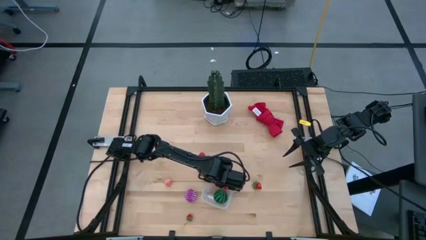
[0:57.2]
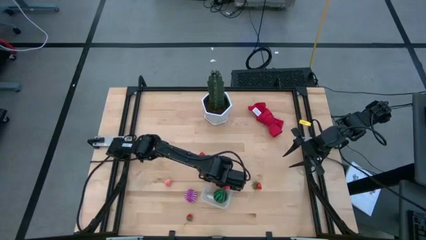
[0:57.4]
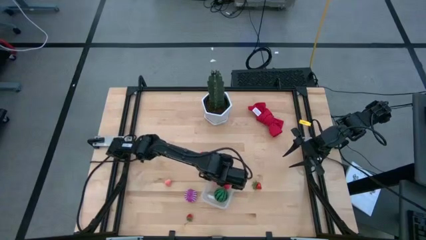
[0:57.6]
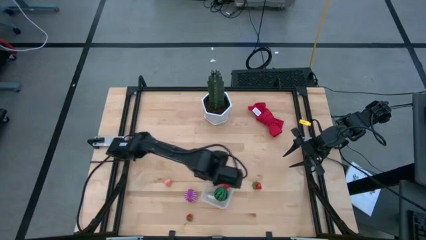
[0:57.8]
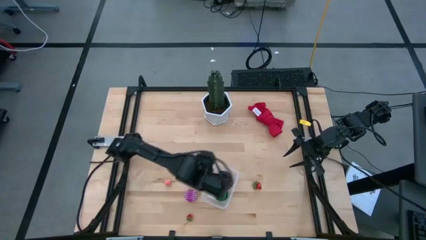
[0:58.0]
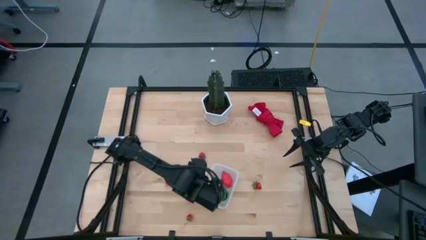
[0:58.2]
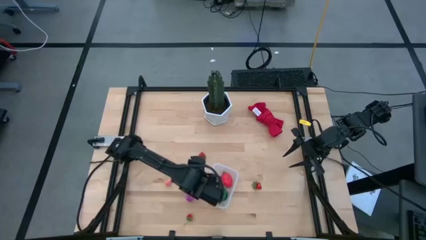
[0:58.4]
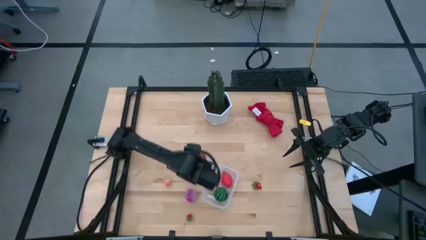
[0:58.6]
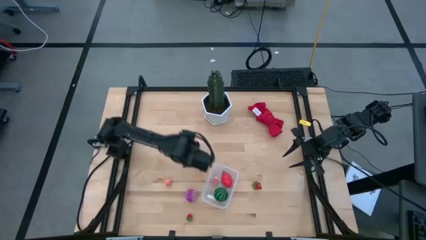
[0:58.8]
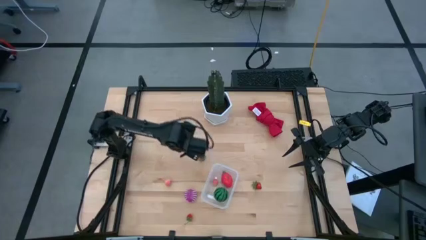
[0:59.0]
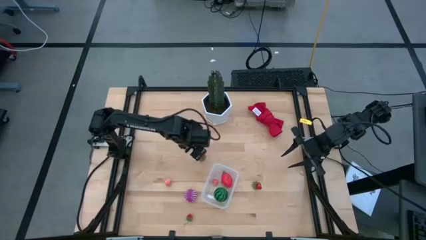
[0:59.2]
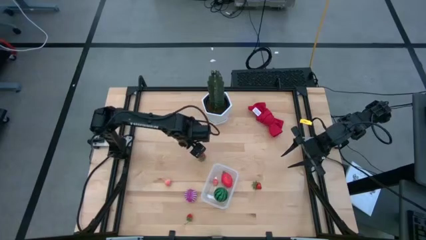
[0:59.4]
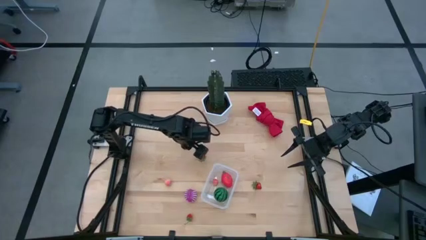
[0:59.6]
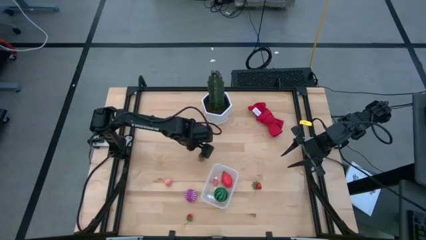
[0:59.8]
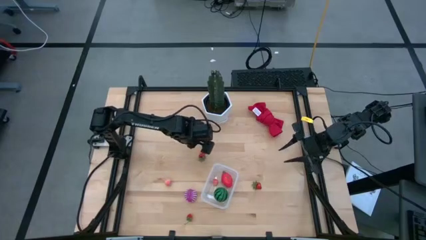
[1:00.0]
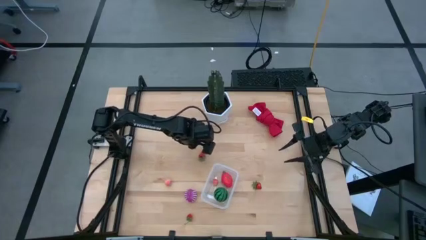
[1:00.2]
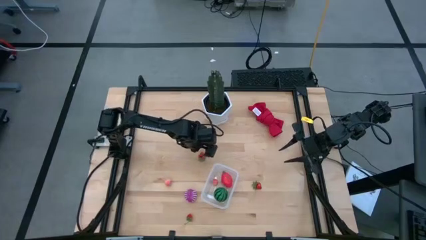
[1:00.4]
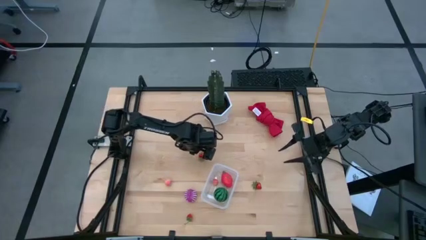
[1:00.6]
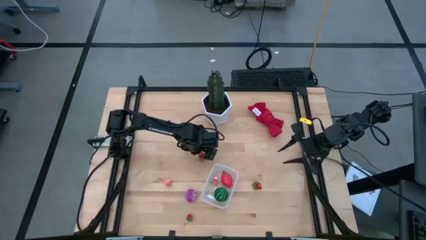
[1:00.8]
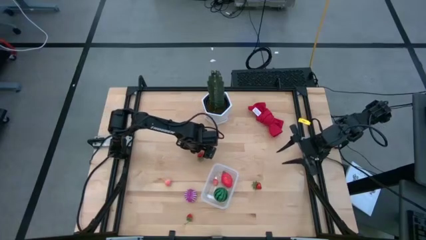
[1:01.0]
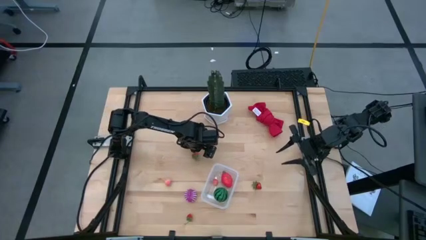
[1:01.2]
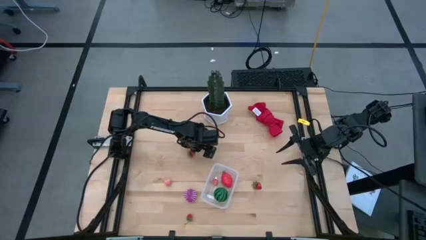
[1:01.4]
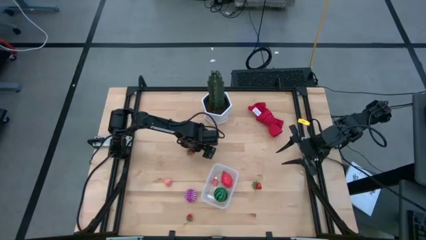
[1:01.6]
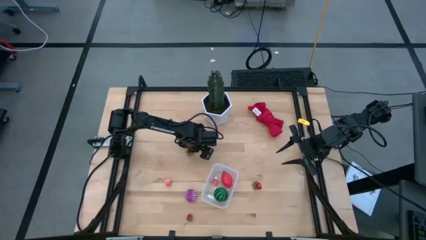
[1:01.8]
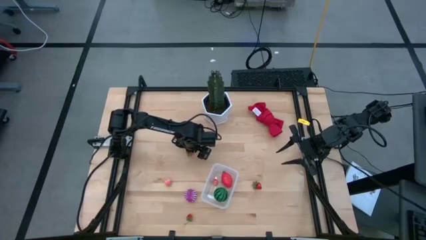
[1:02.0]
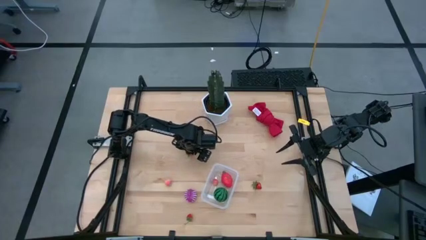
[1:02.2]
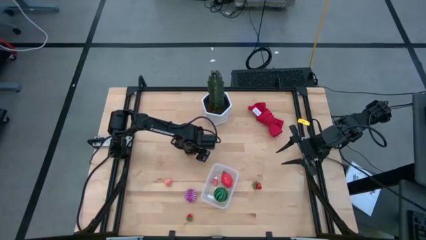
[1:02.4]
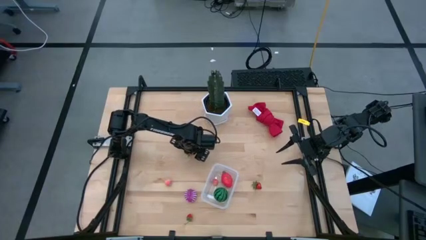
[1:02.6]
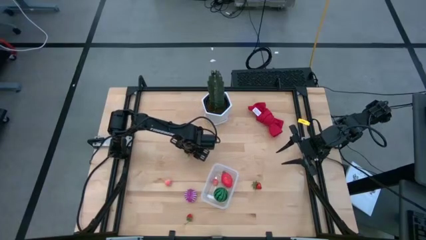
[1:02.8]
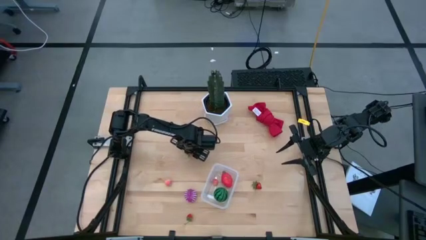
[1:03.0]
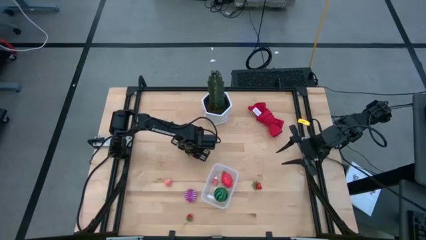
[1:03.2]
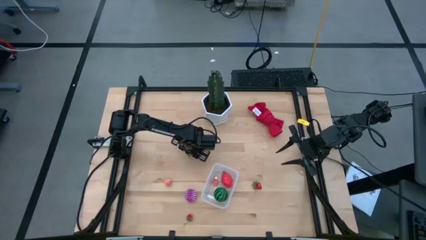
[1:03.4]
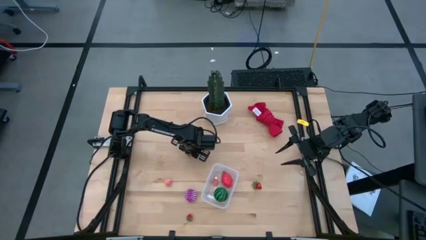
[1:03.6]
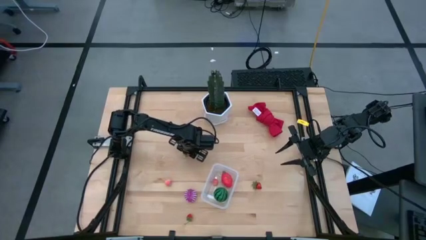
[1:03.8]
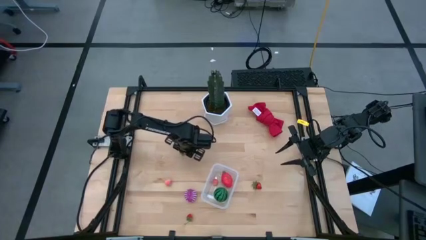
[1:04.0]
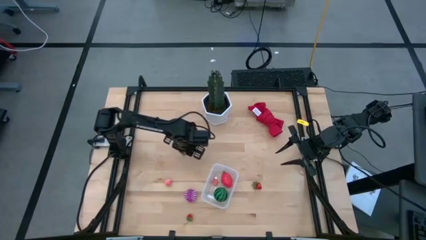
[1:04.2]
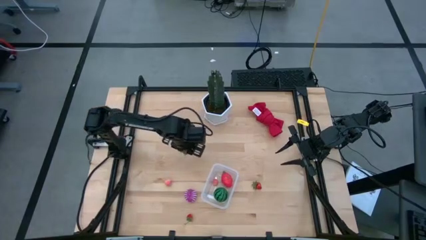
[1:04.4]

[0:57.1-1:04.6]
Task: Pick and placing Produce into tupperware
Put the top red strawberry into the transparent bin

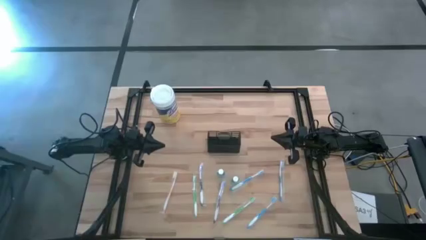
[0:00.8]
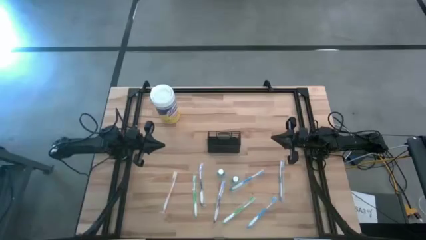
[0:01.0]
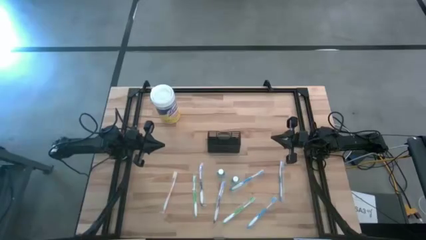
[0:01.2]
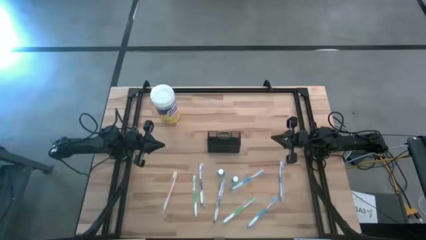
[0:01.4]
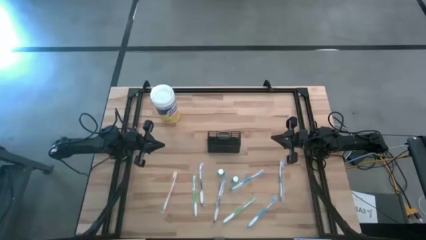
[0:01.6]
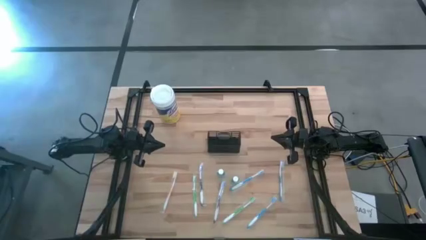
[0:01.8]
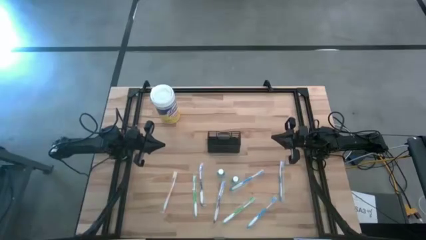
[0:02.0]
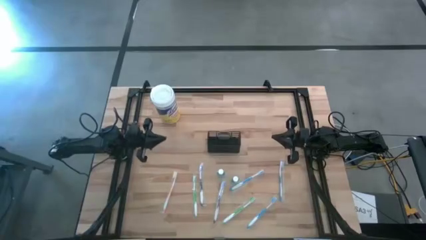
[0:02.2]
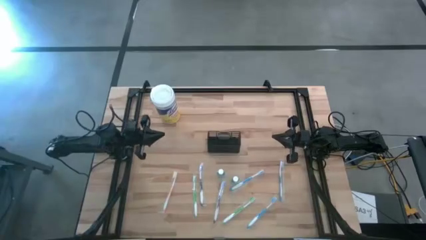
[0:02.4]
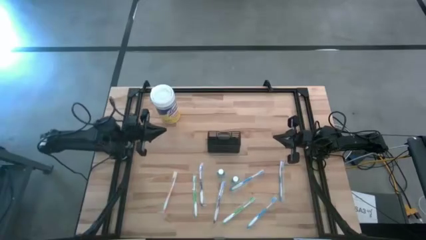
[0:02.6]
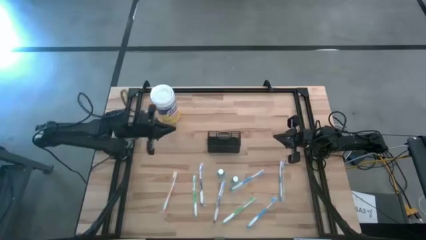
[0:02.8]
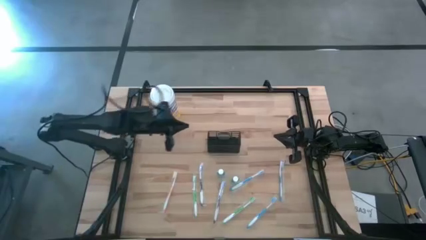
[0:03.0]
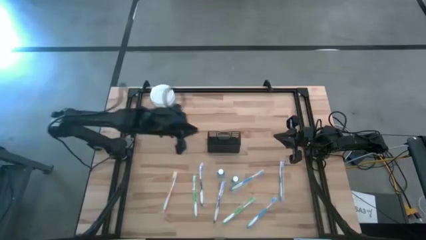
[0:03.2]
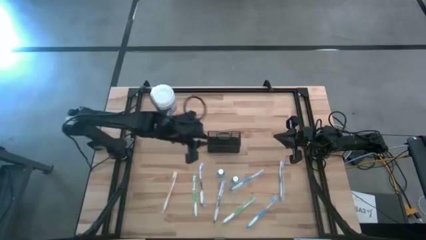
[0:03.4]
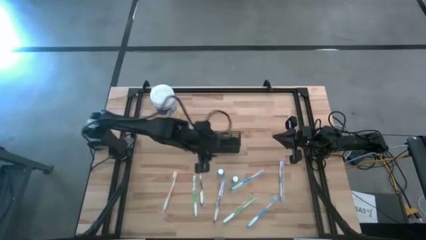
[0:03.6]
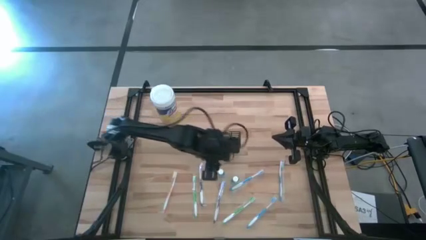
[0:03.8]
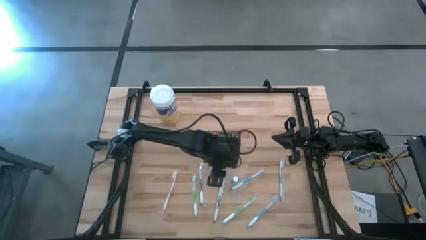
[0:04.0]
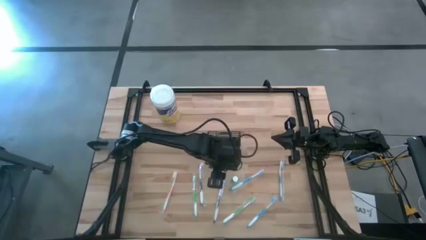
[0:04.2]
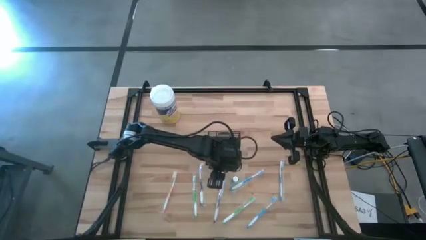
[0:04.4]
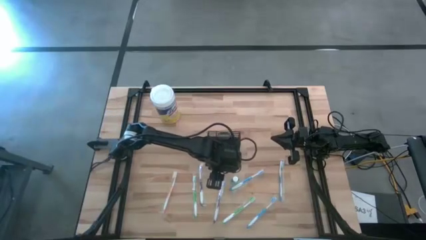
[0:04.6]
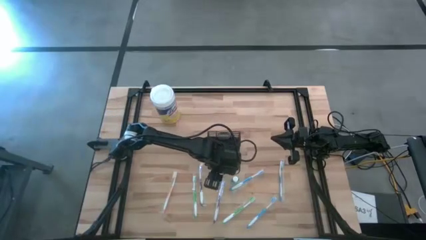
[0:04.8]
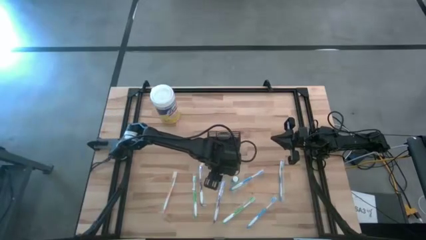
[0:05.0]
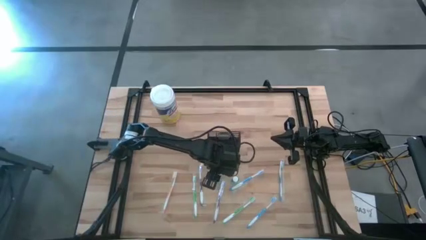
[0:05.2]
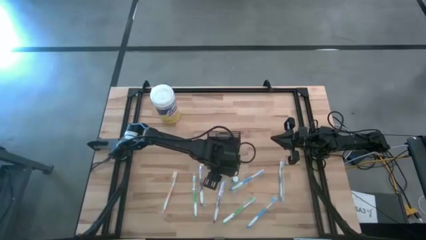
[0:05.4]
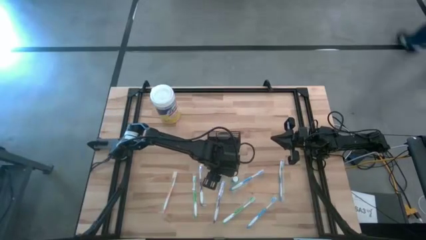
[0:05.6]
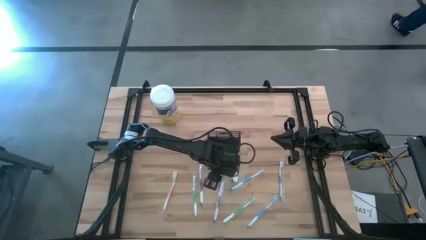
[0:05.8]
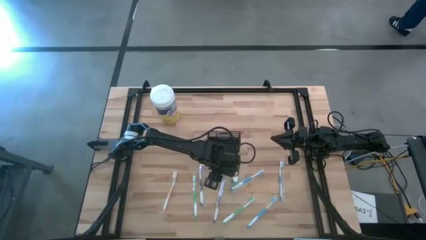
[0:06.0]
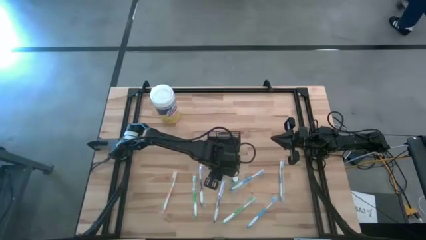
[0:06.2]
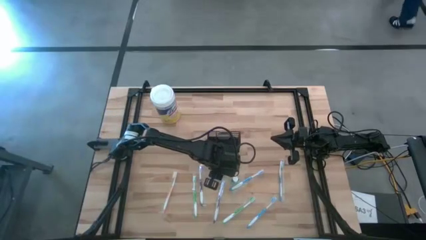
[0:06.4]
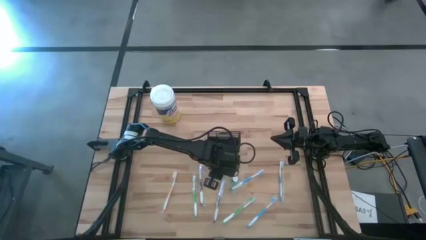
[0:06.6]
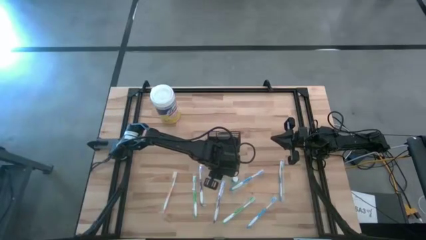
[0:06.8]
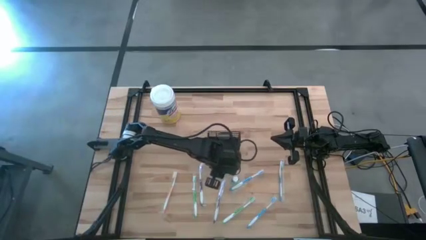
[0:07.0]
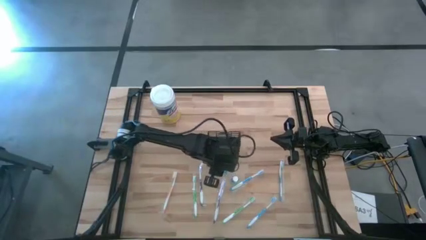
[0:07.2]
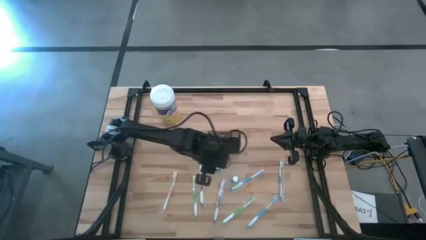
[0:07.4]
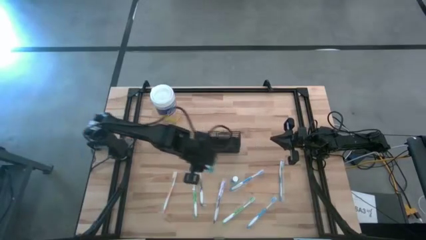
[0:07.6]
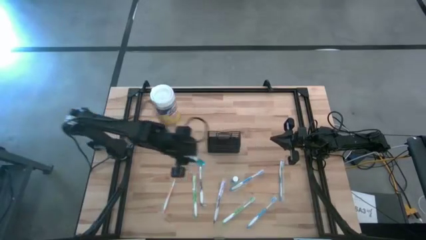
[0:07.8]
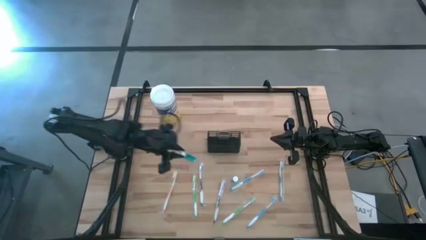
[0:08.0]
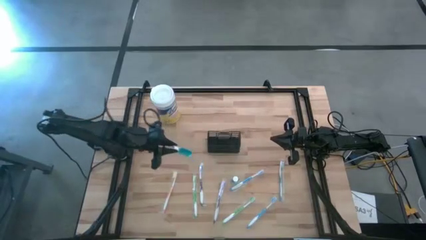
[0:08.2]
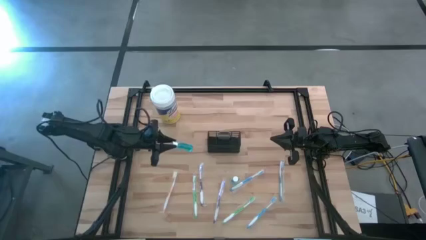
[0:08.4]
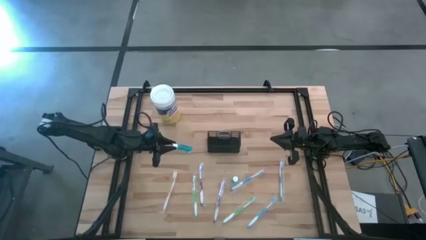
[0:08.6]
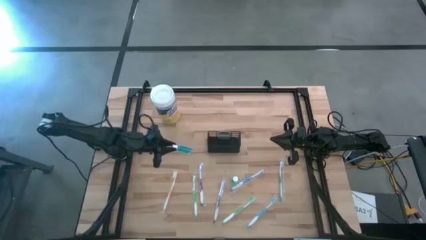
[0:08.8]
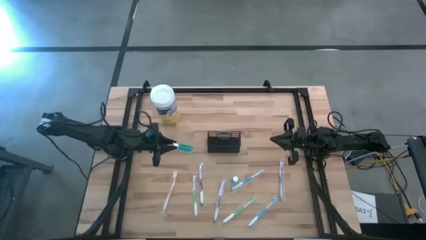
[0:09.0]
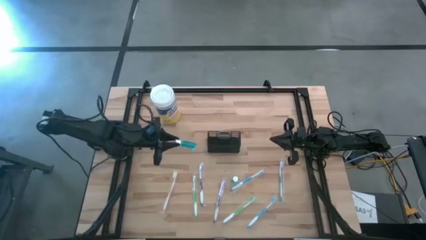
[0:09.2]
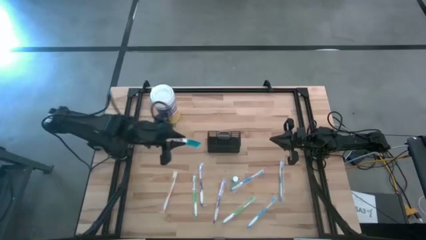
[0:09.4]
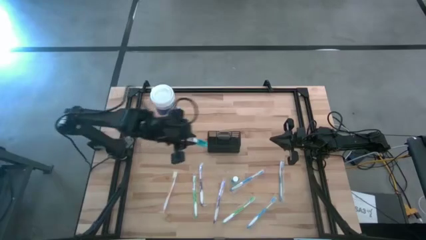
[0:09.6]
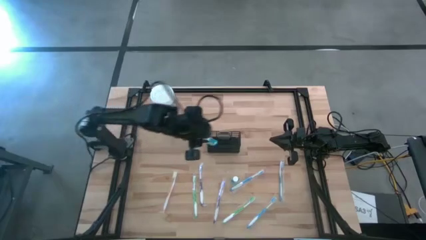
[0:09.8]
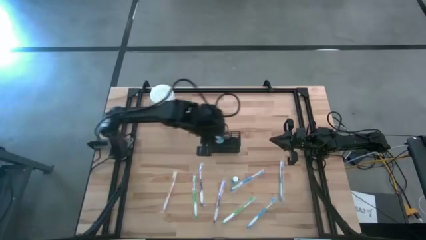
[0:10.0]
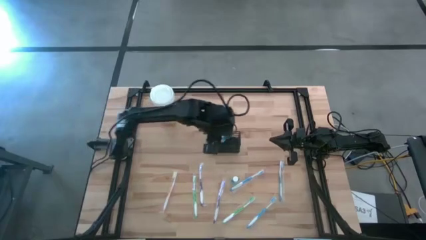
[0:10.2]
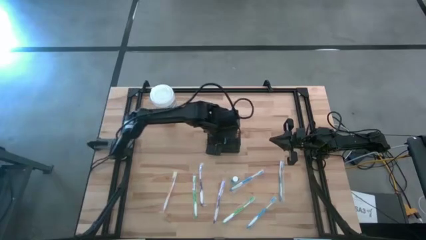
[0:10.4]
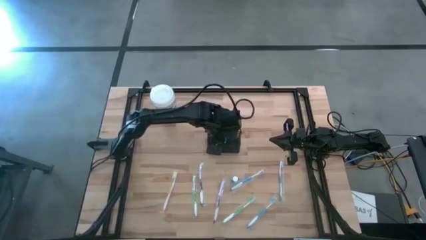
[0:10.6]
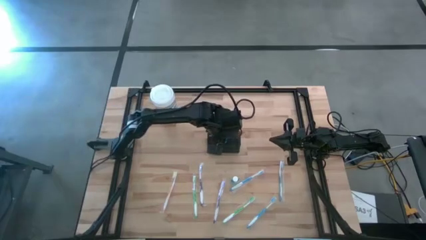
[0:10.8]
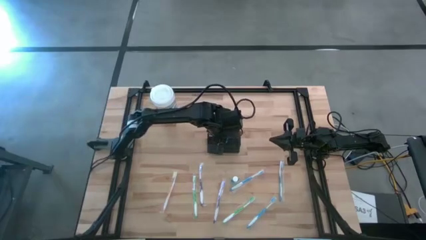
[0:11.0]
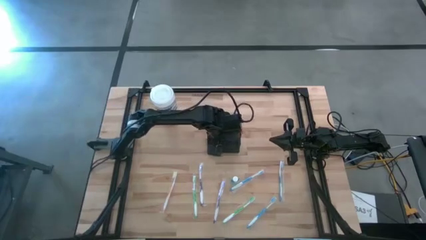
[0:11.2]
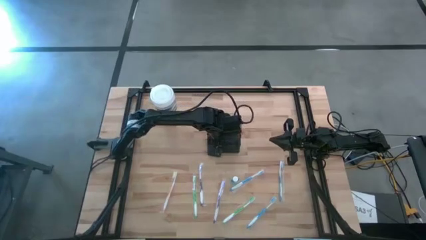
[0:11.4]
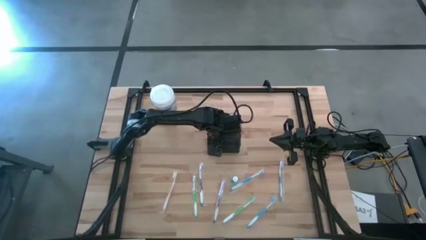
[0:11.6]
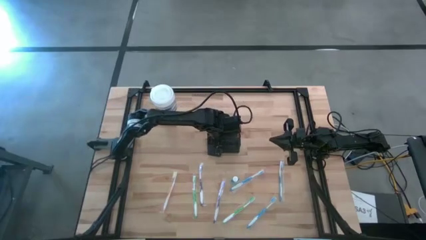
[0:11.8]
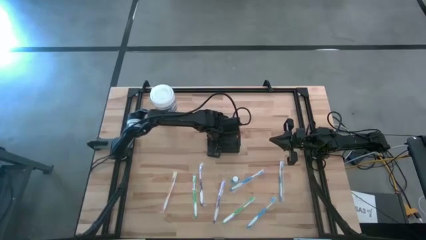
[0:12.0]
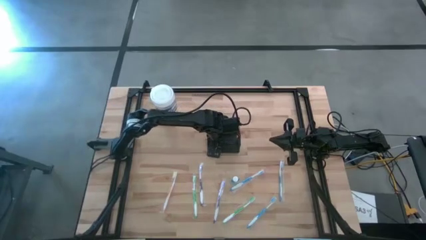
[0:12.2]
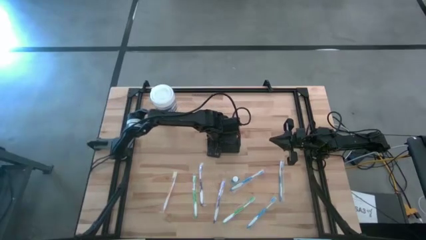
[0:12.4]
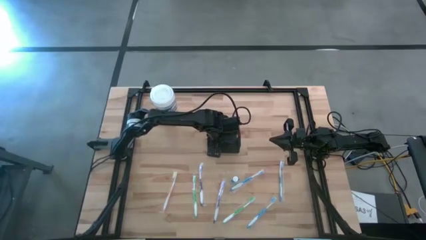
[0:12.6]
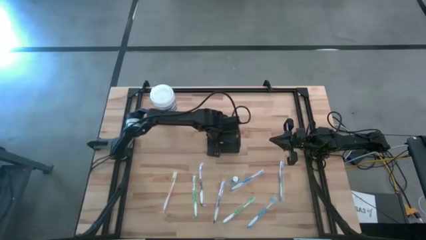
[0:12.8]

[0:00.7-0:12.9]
Task: Pick & Place toothbrushing station
Put the left mouthwash into the black mesh organizer
